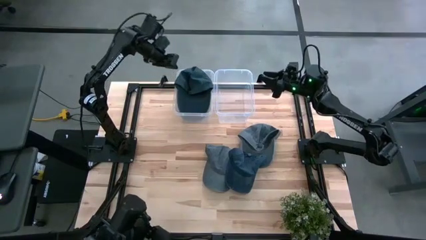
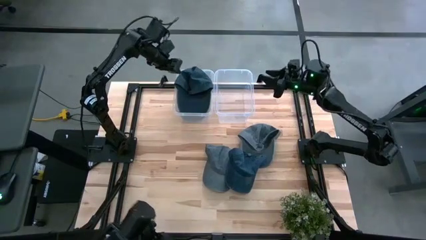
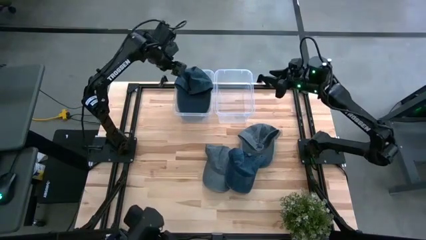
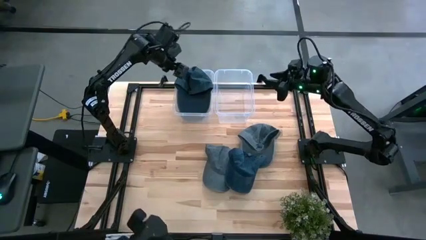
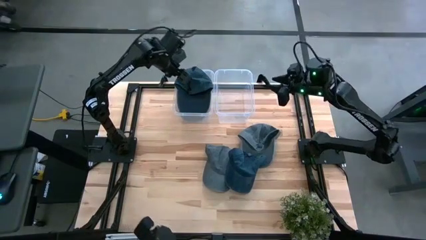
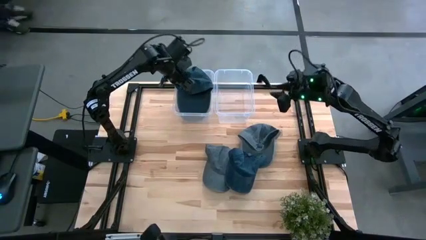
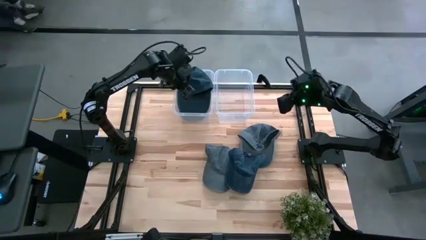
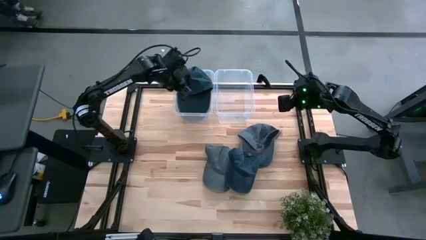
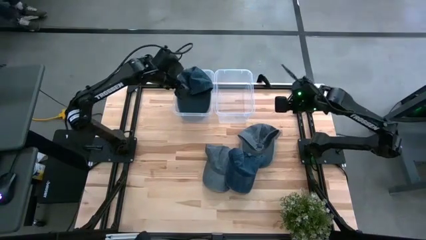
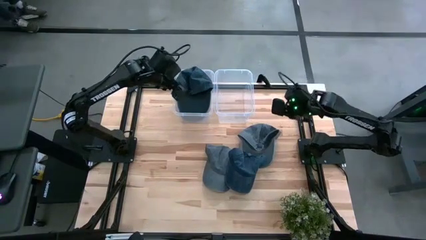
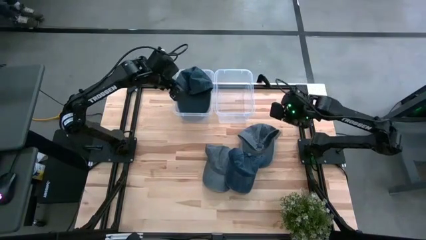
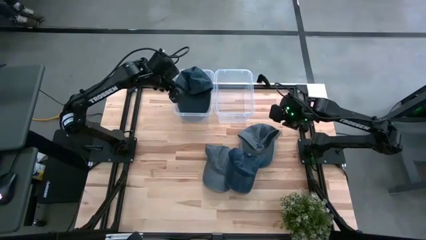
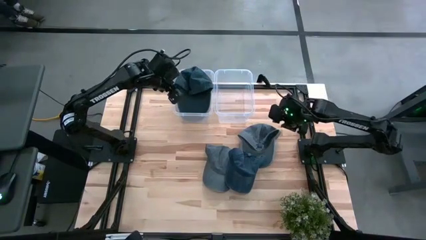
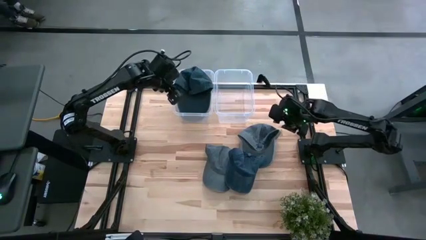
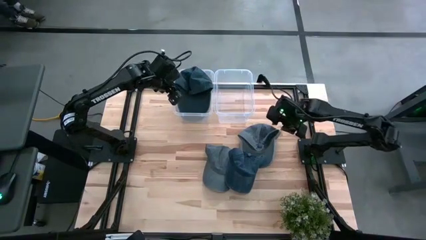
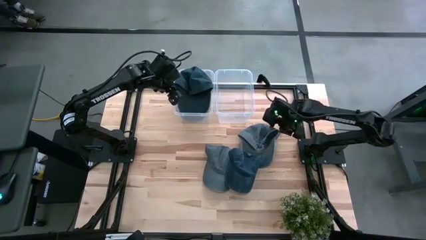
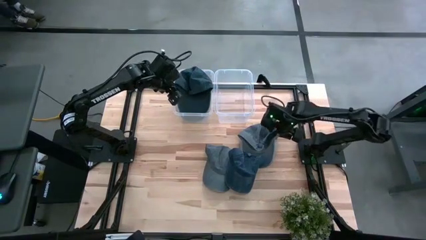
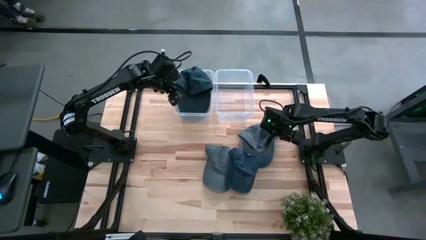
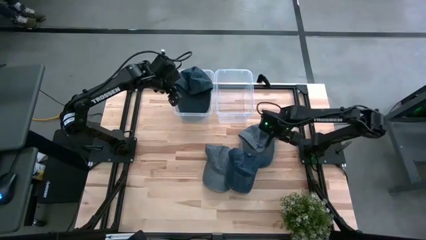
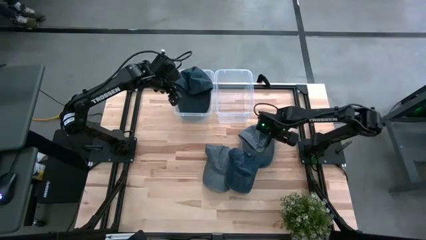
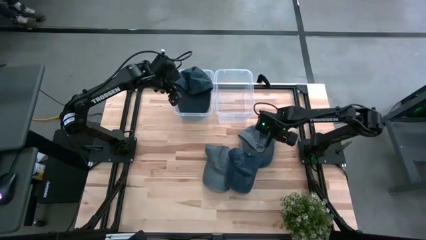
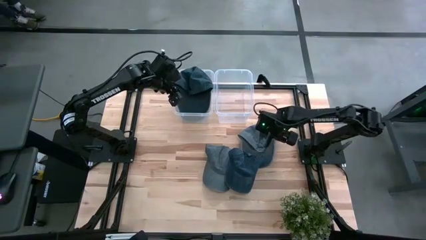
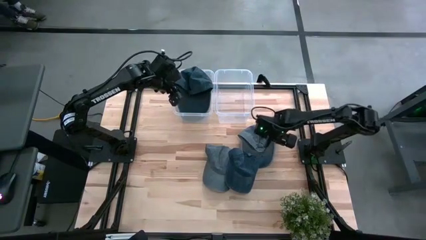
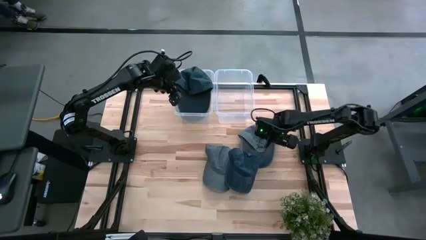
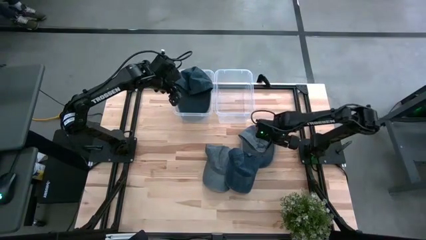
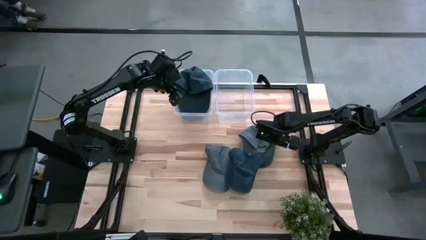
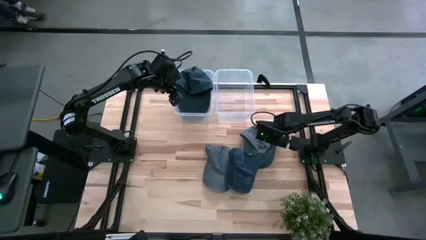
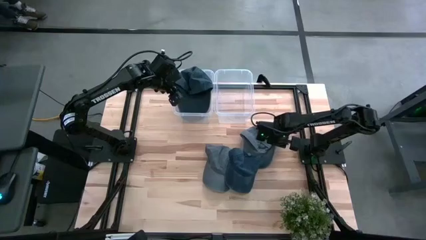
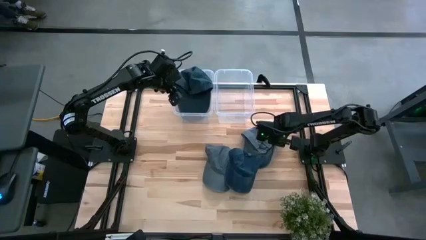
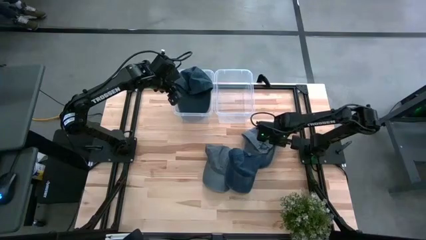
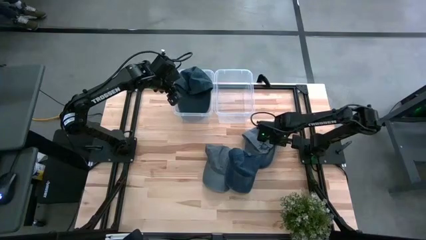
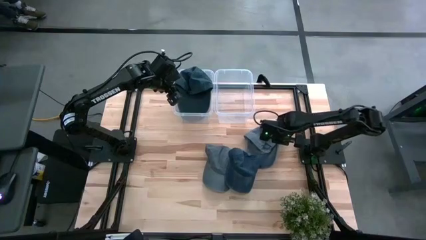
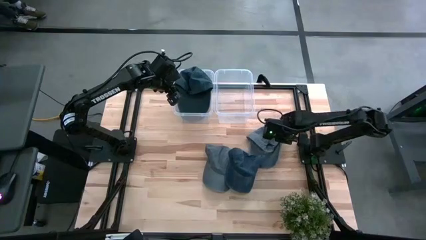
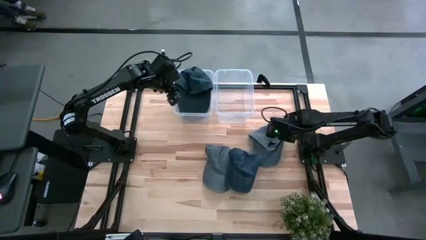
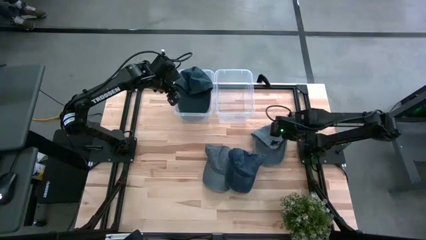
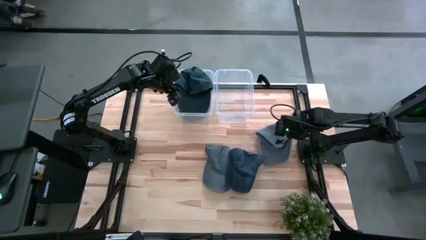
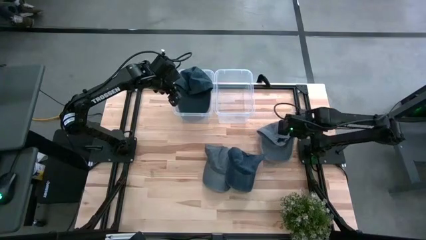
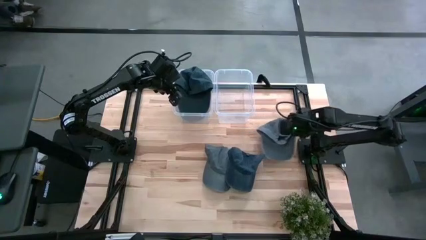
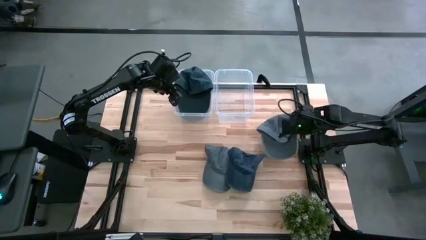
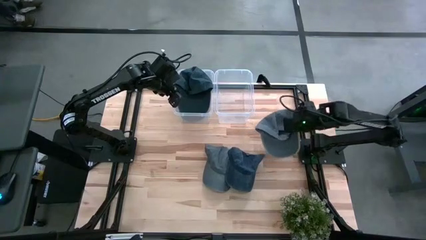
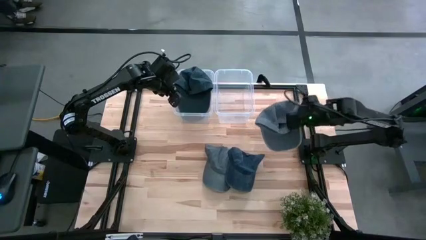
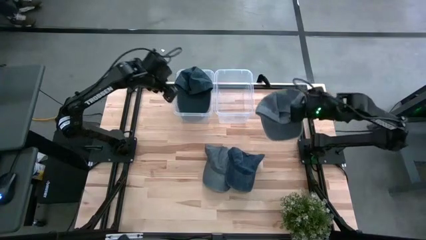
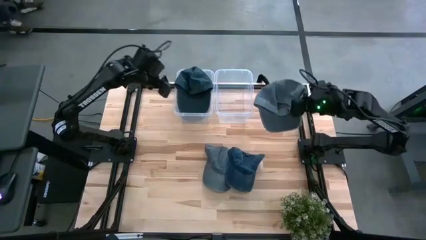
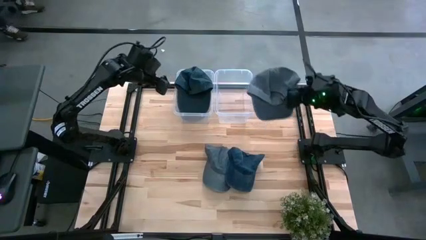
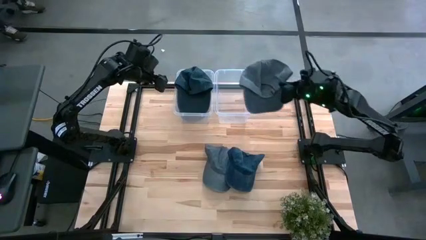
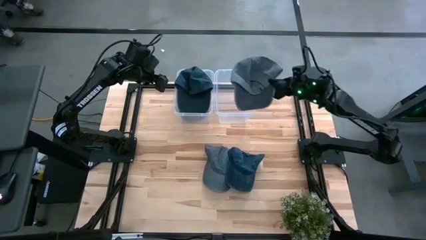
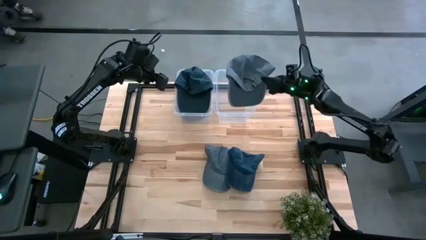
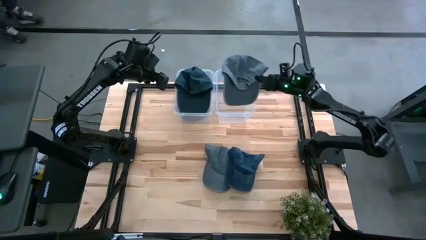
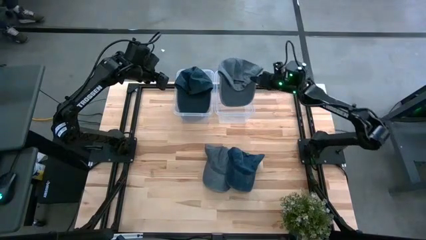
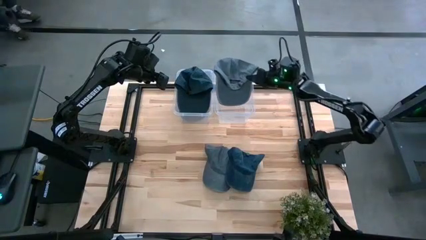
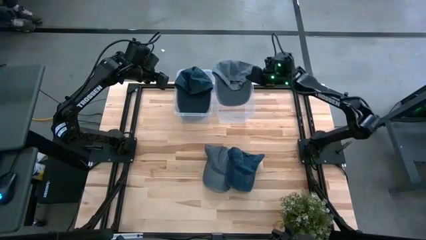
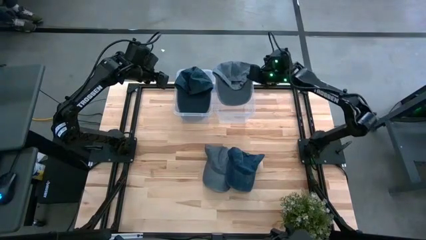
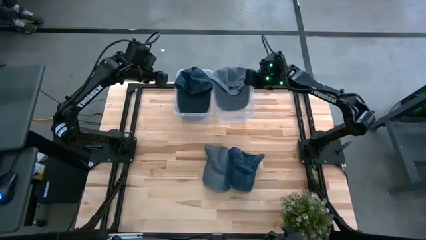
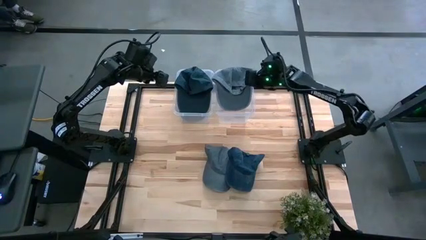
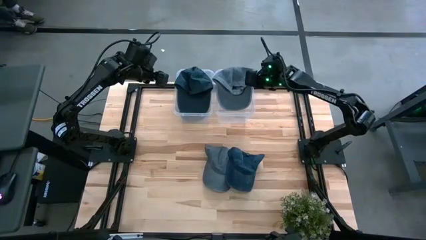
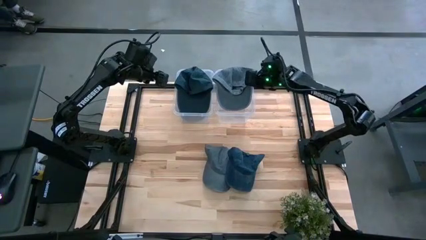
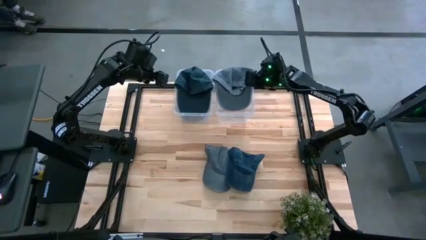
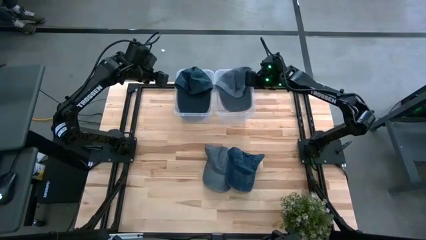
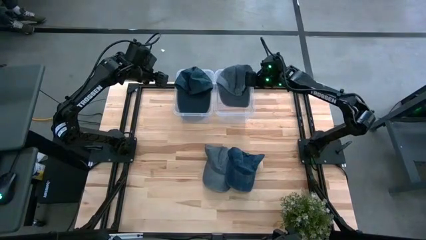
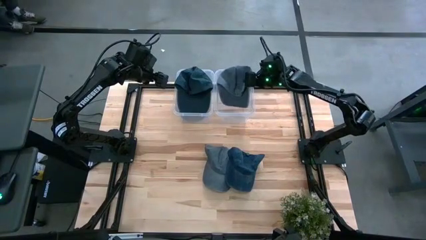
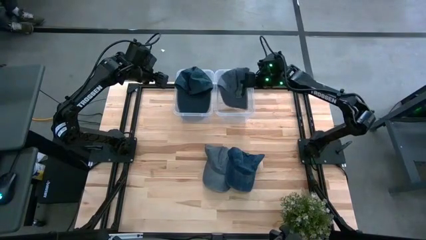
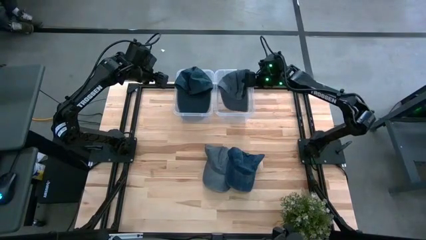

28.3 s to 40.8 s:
Task: Pick and place caps into container
Put the right gray cap into the right transparent container

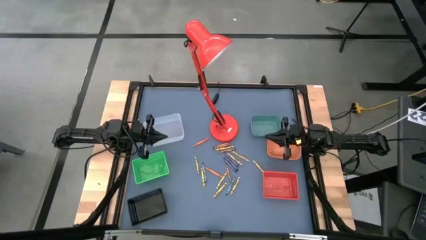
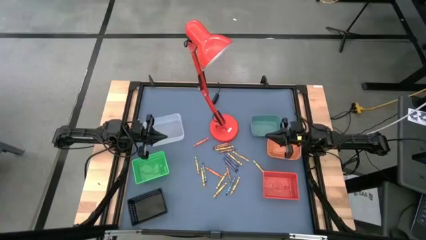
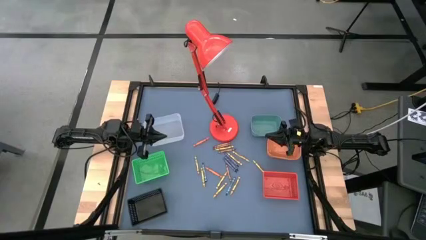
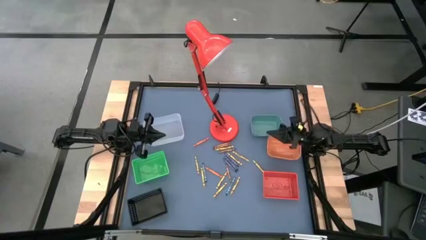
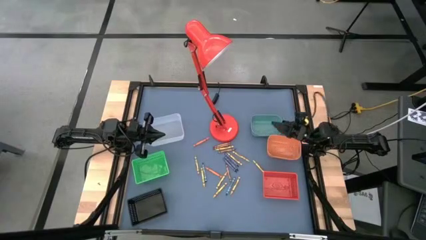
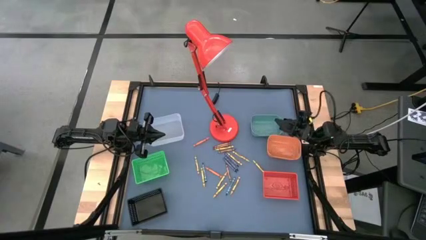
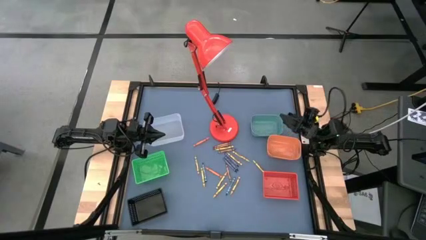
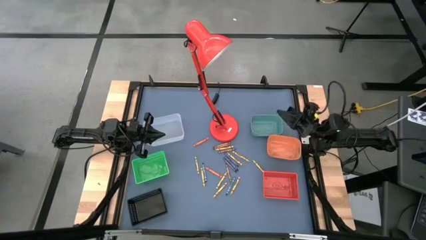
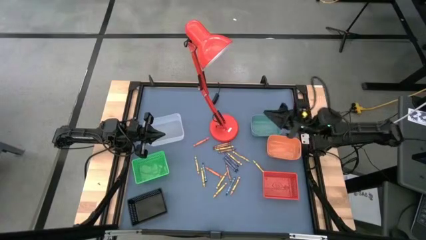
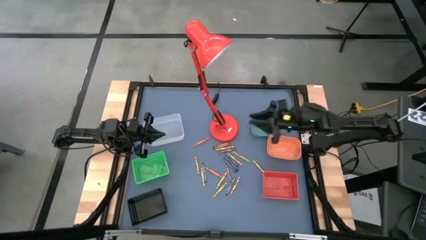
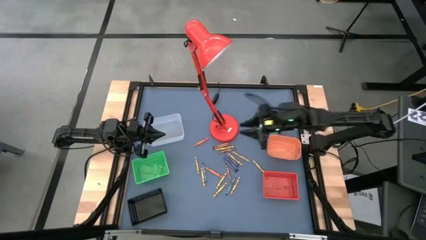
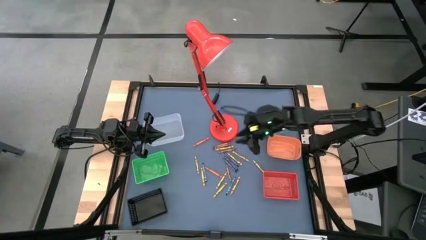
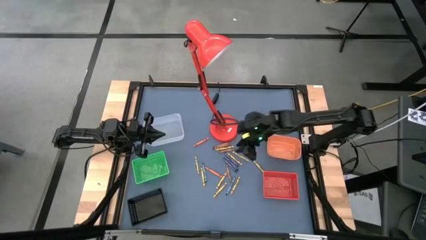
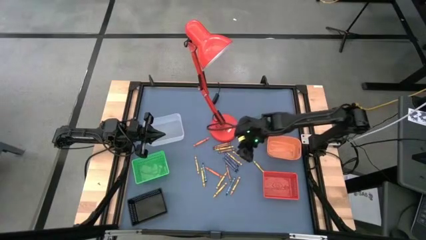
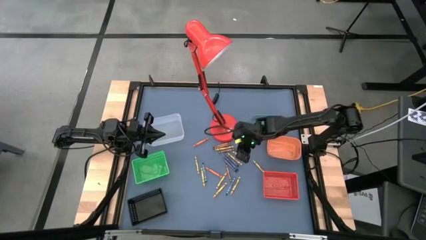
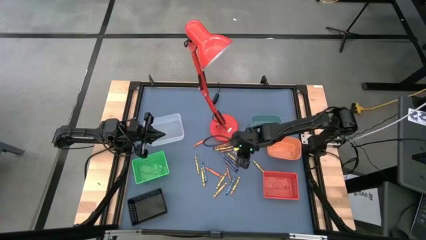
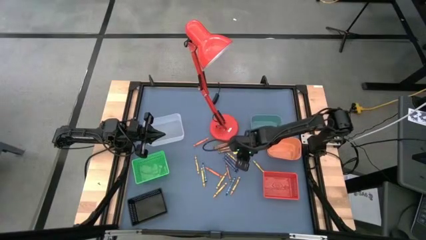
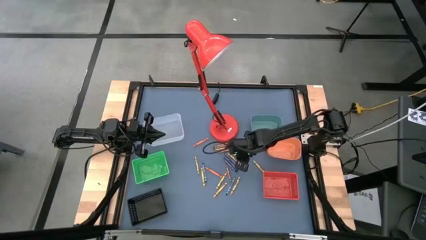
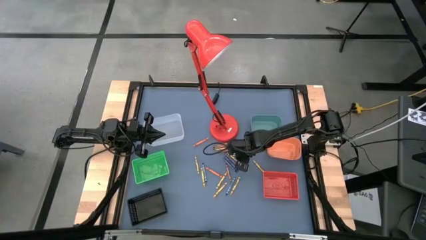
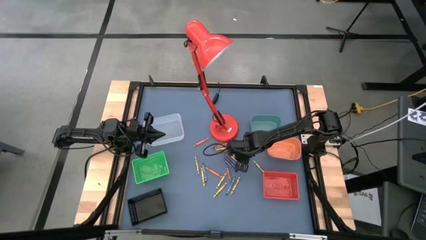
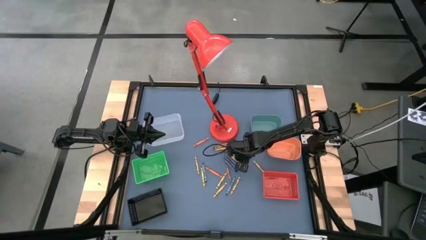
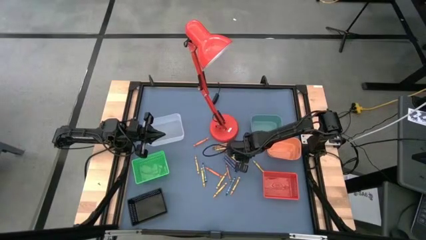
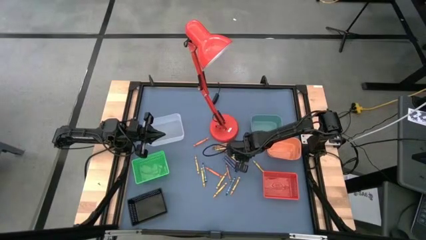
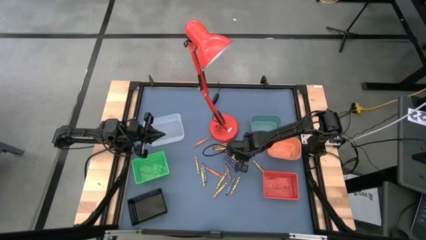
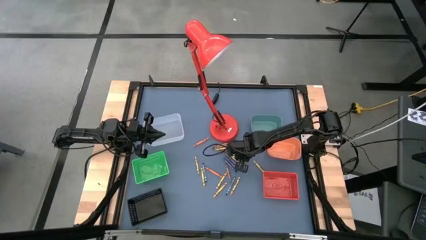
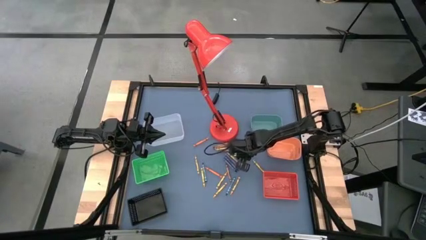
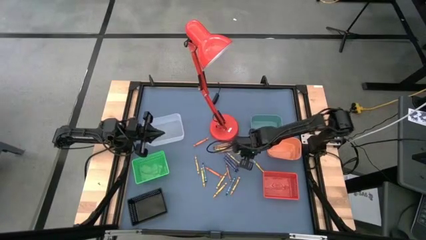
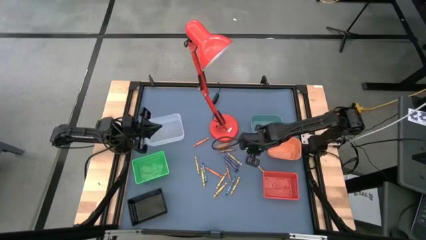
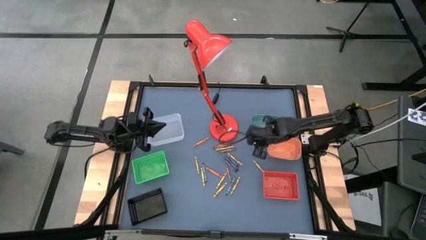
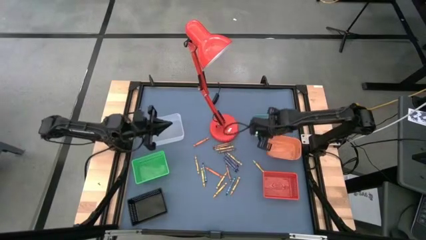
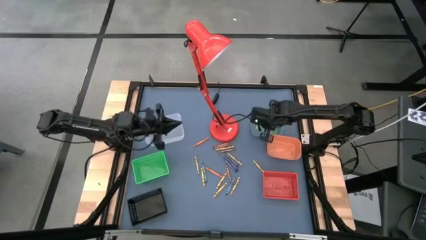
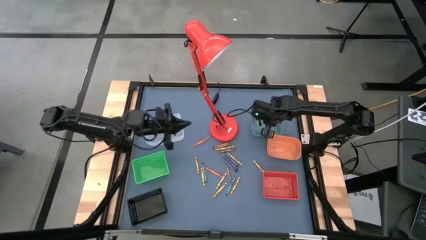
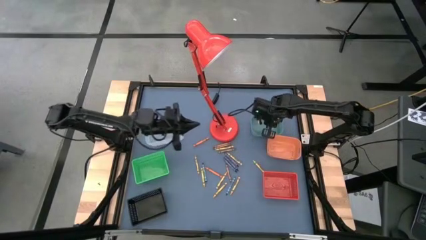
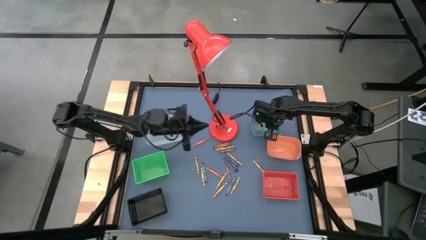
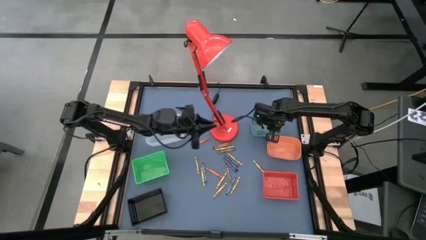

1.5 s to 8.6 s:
Task: Sort crayons
Put the yellow crayon into the blue bin
